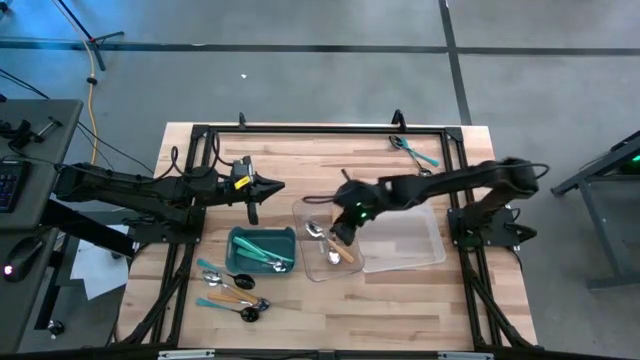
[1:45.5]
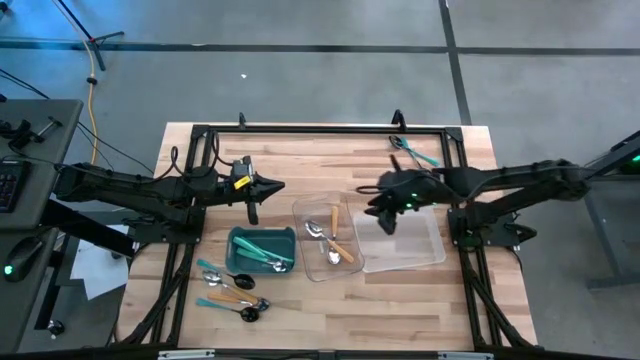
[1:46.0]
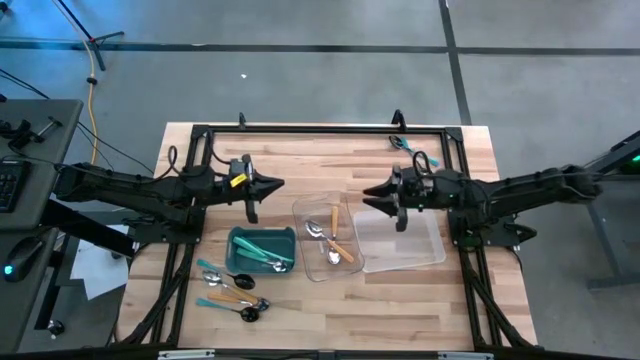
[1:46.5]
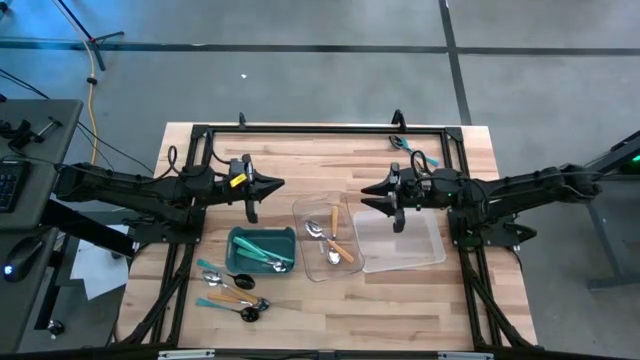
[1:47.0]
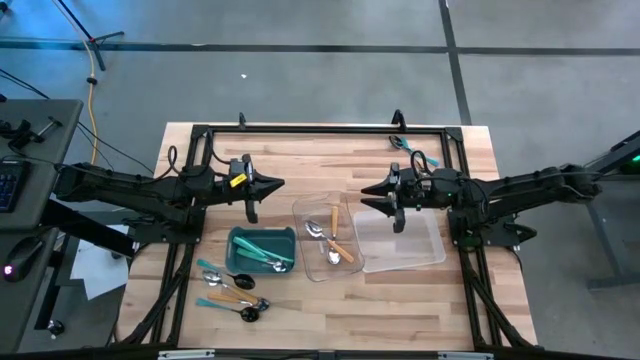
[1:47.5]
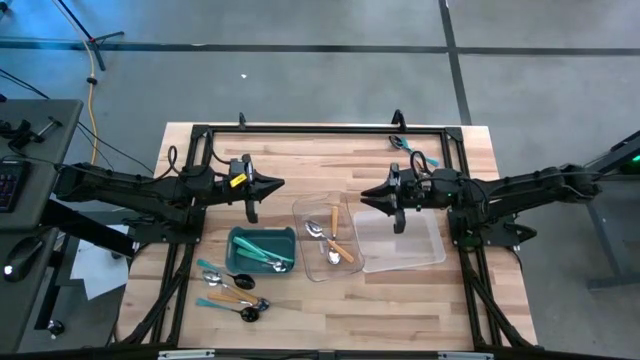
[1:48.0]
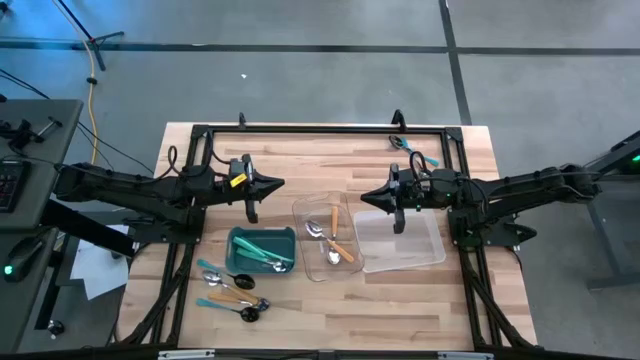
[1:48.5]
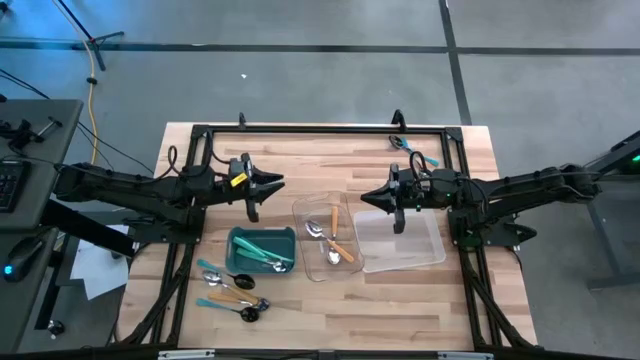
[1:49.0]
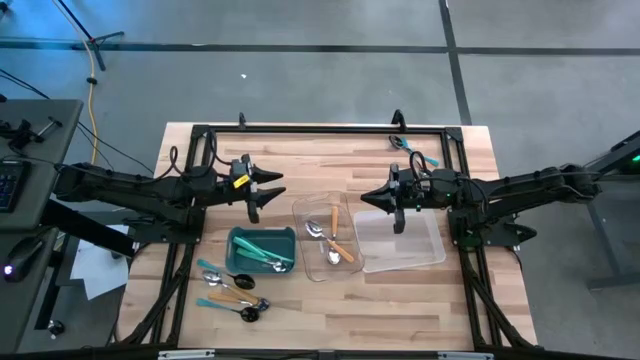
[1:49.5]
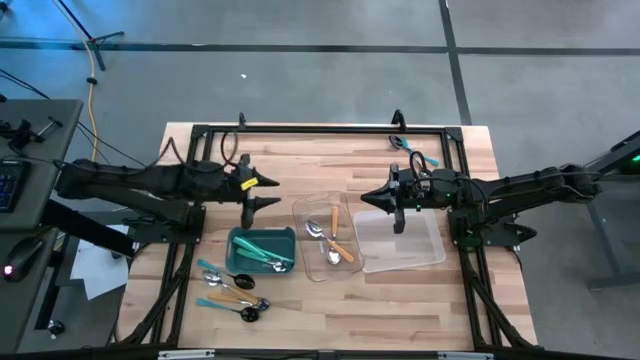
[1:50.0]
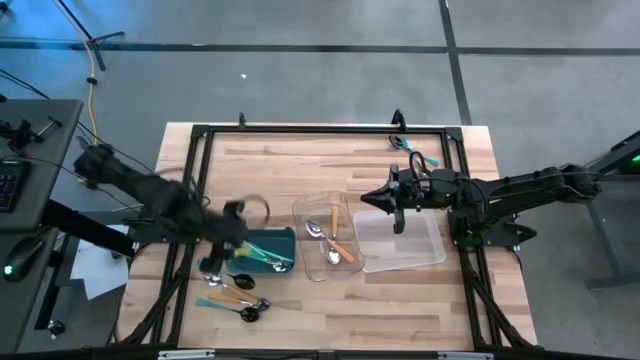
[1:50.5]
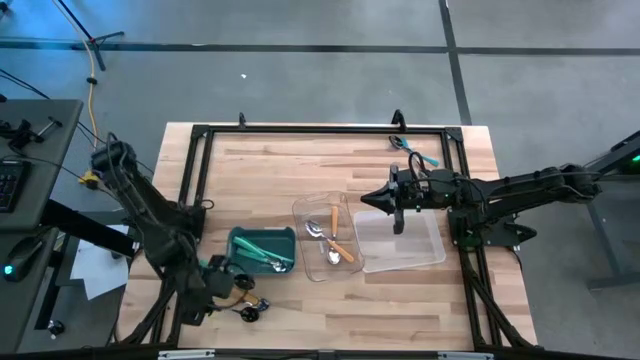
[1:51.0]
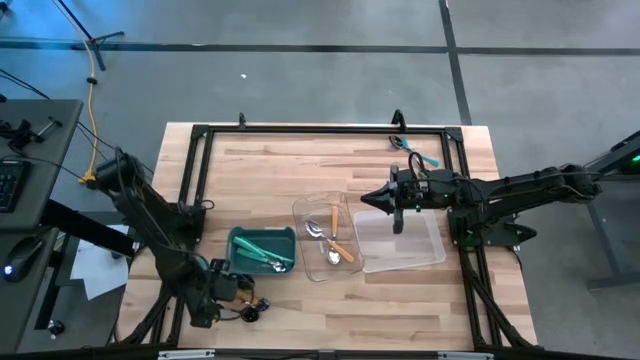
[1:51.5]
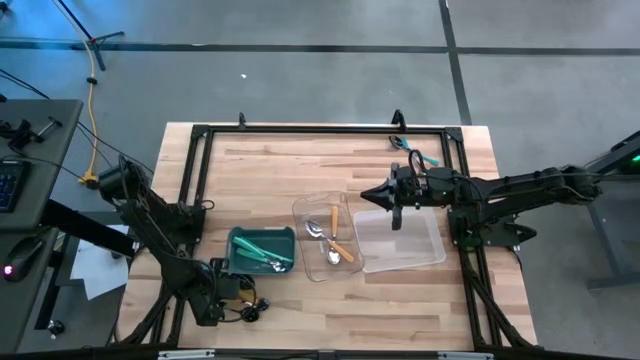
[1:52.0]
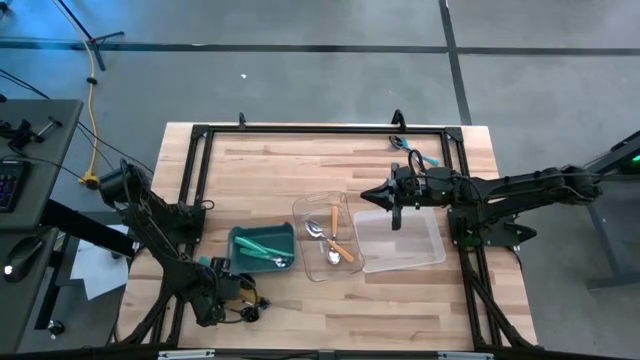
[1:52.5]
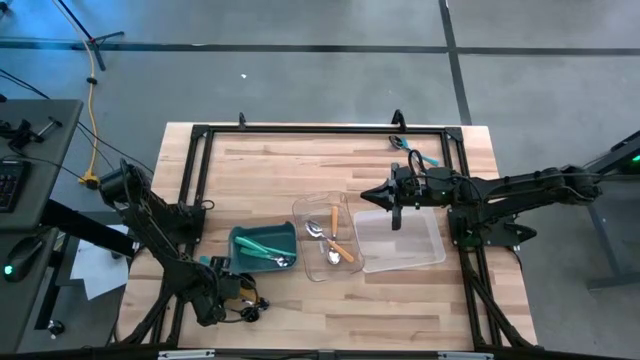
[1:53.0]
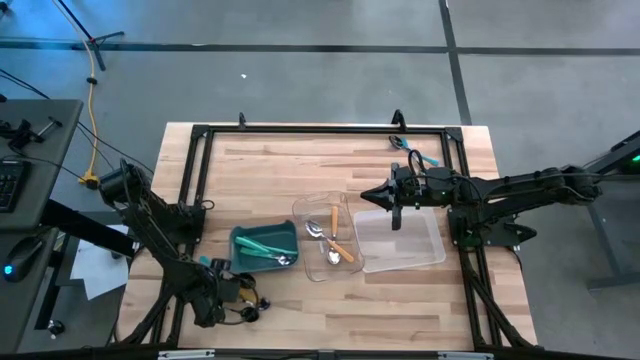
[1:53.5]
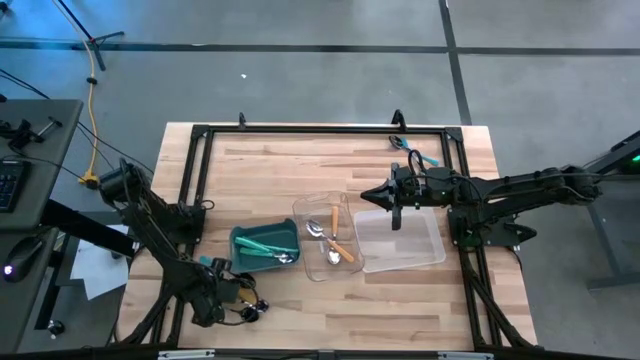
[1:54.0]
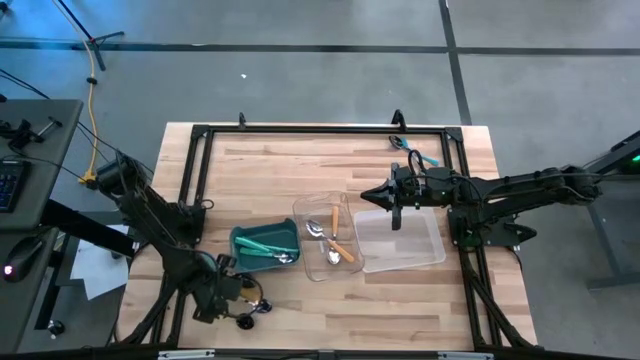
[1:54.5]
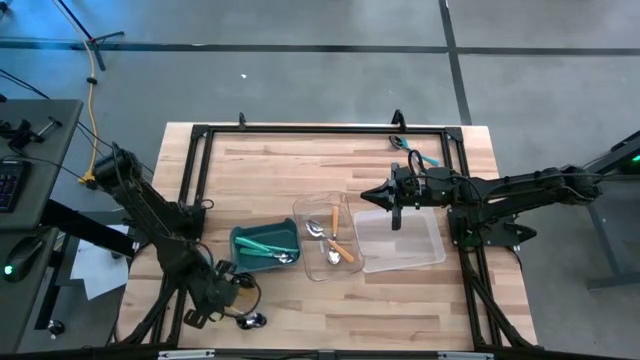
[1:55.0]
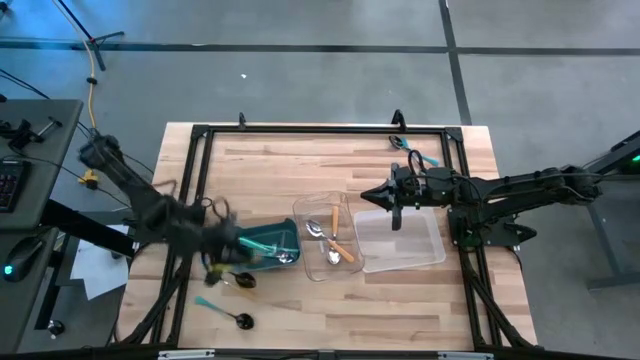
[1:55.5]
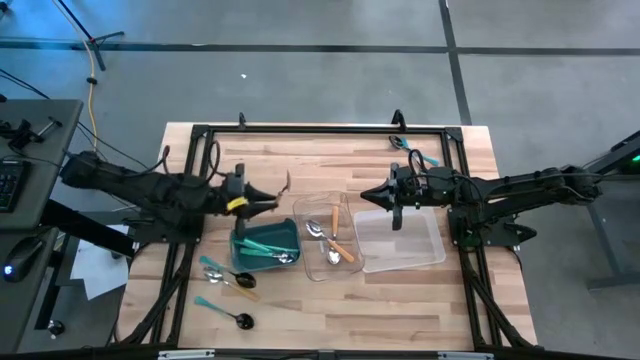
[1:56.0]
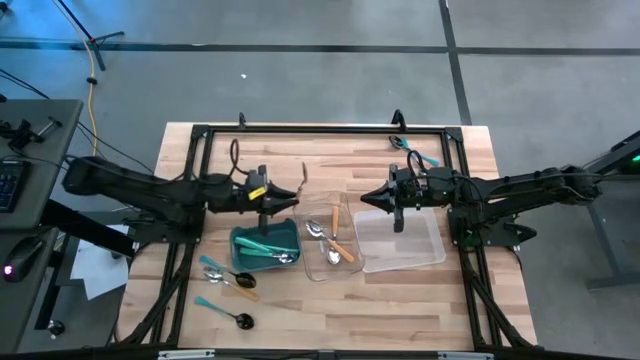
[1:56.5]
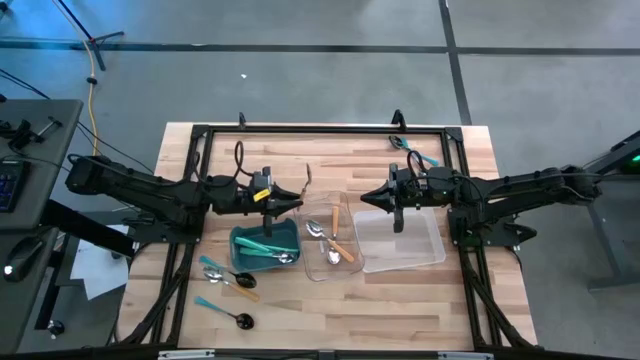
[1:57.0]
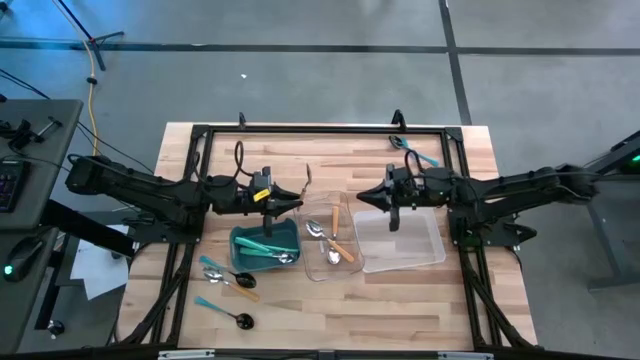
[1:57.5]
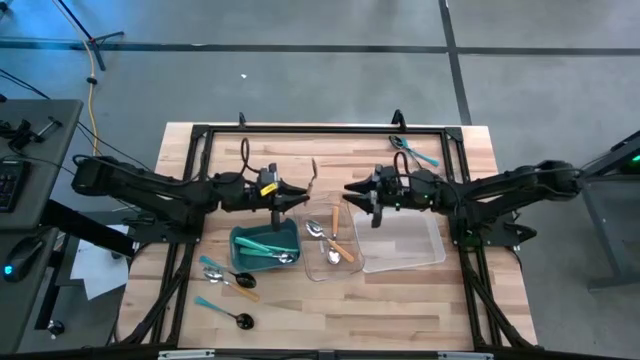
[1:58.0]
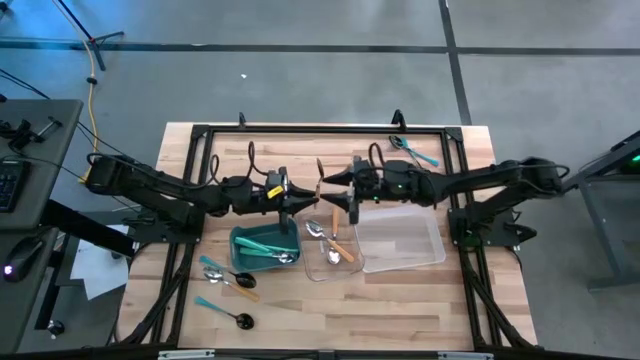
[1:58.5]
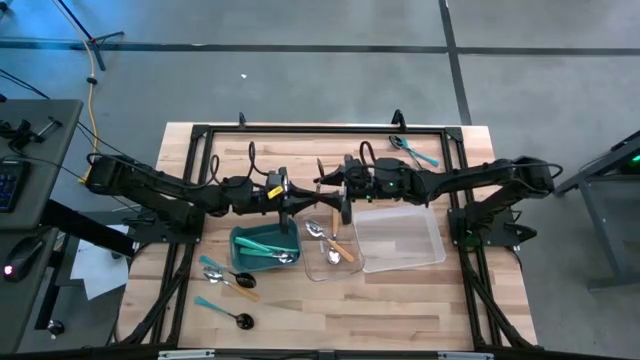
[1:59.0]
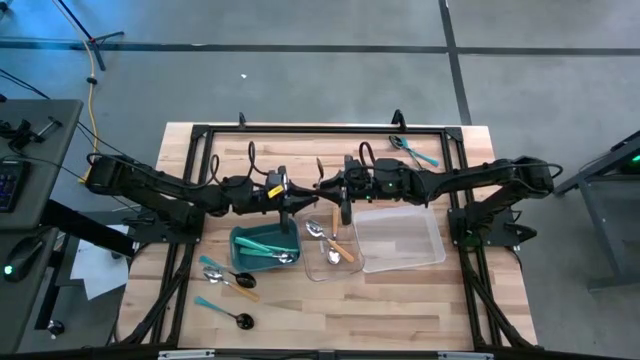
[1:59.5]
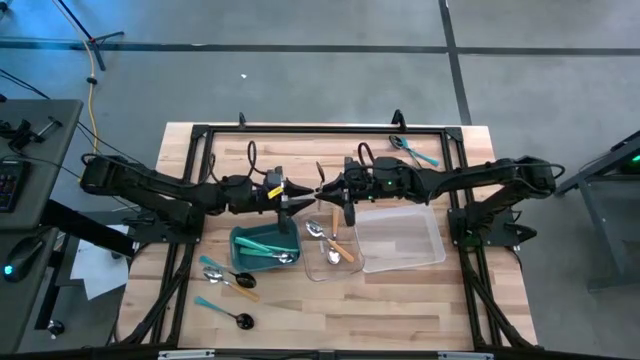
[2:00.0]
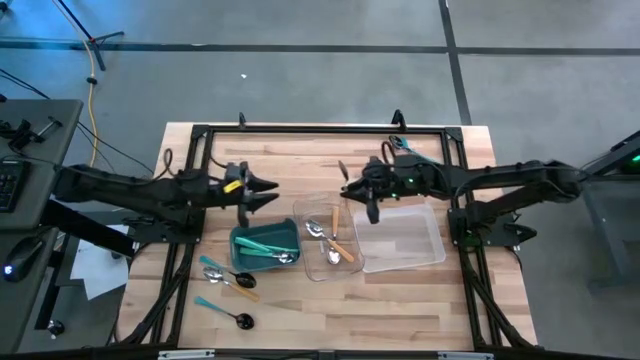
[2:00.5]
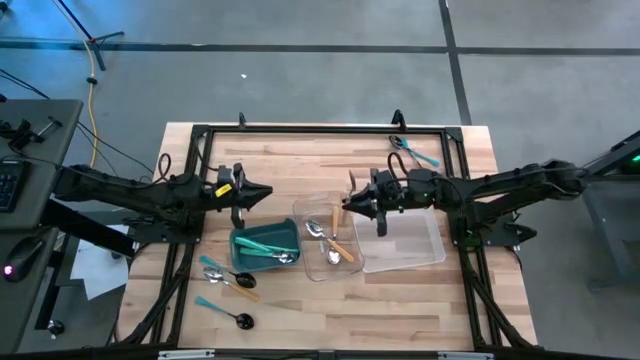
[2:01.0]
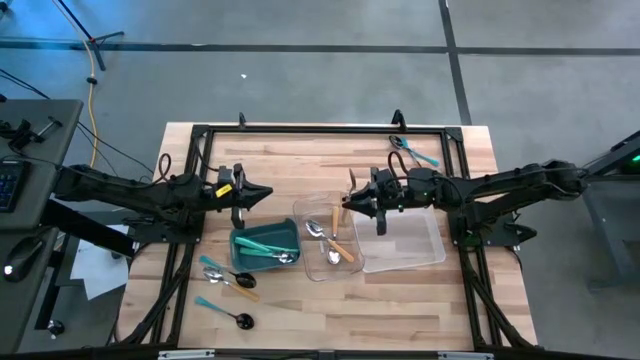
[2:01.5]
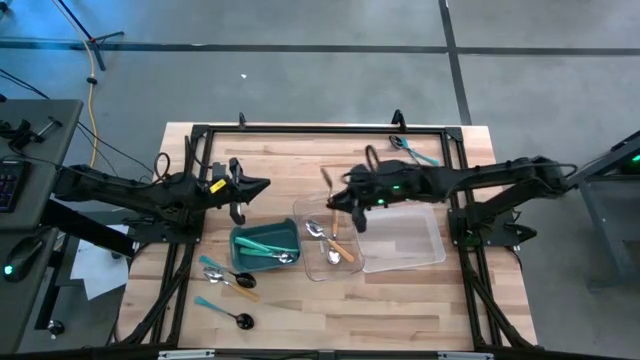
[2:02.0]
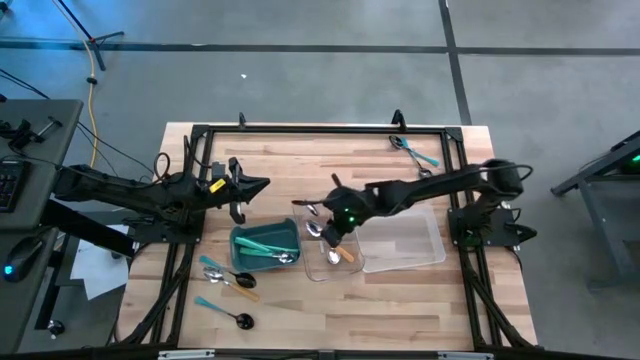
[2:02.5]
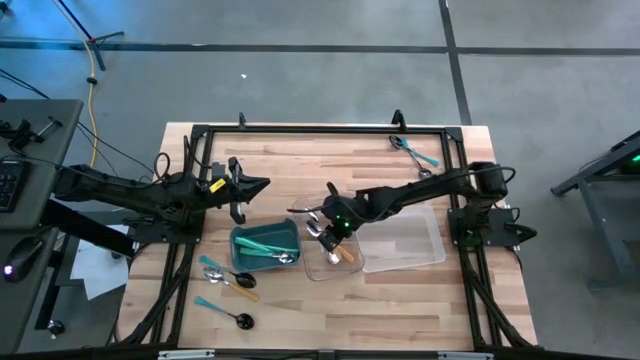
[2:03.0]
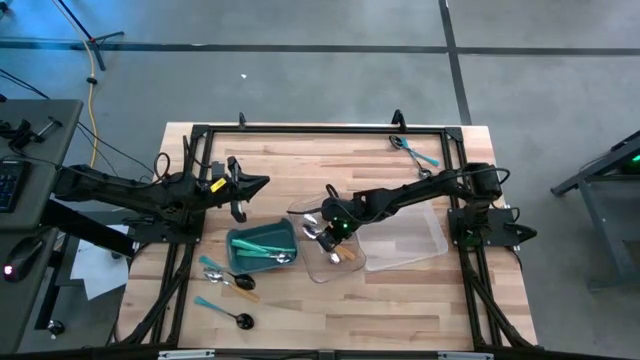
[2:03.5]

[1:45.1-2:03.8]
Task: Sort silverware by color (type)
Put the orange spoon into the transparent bin
